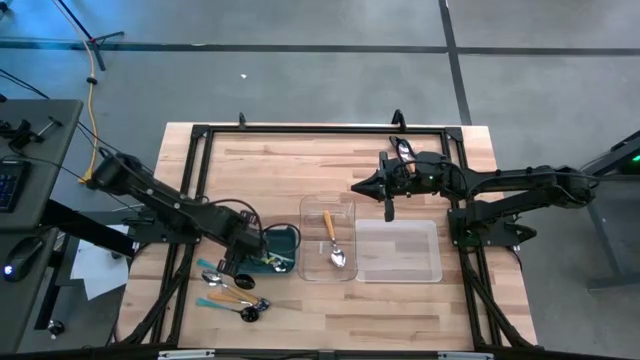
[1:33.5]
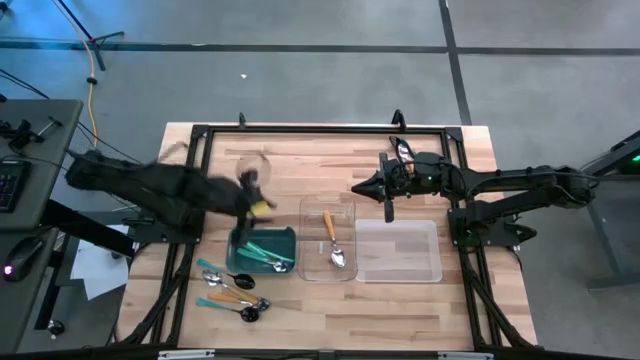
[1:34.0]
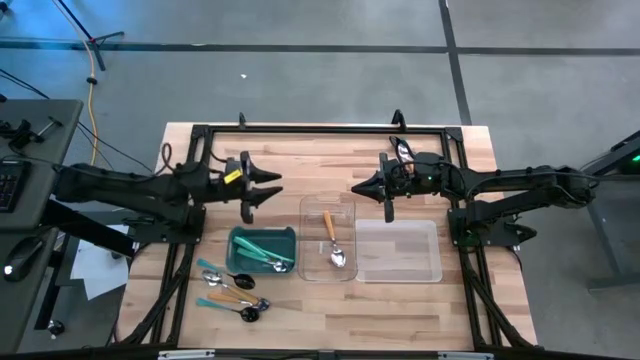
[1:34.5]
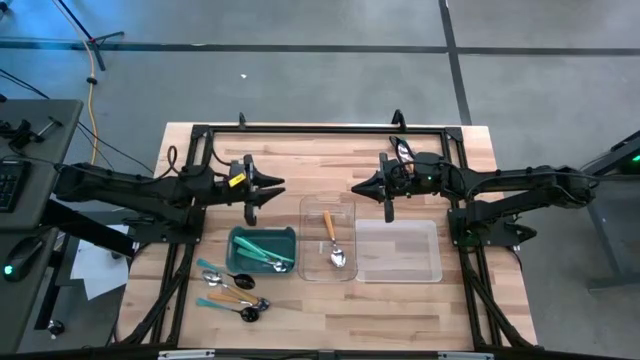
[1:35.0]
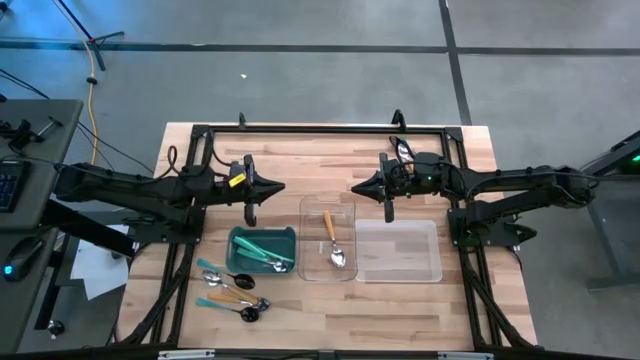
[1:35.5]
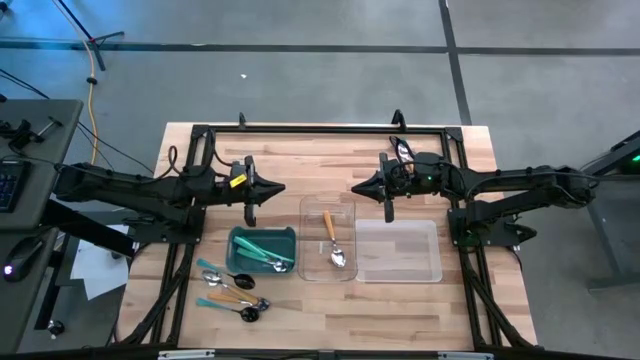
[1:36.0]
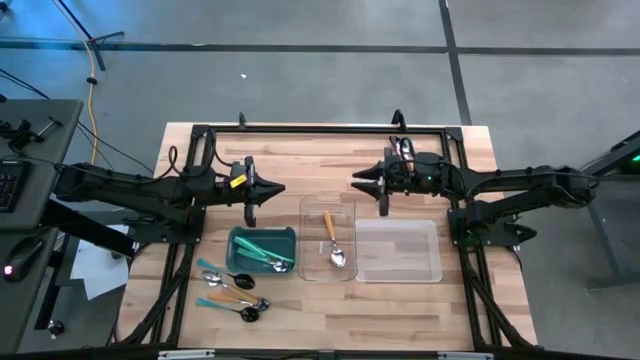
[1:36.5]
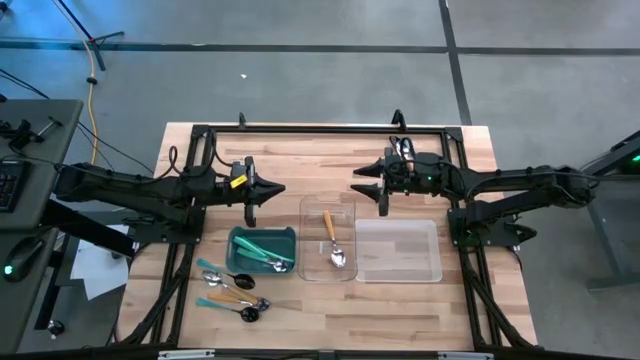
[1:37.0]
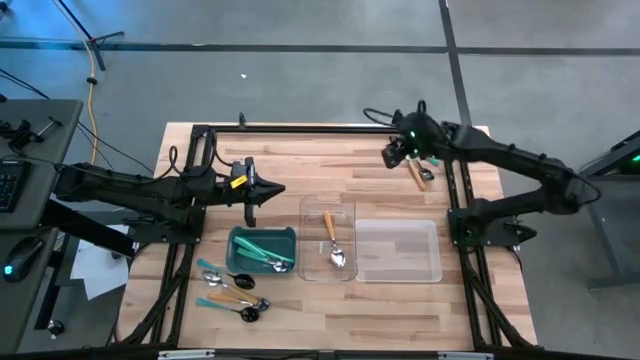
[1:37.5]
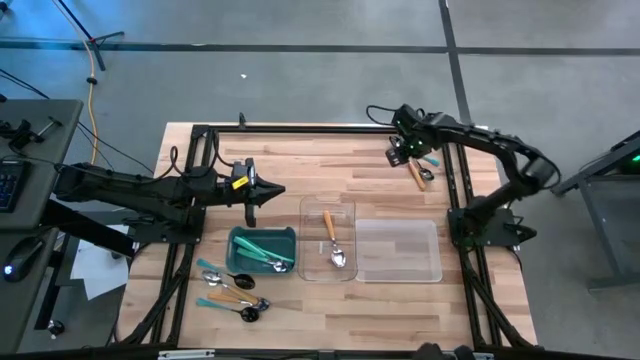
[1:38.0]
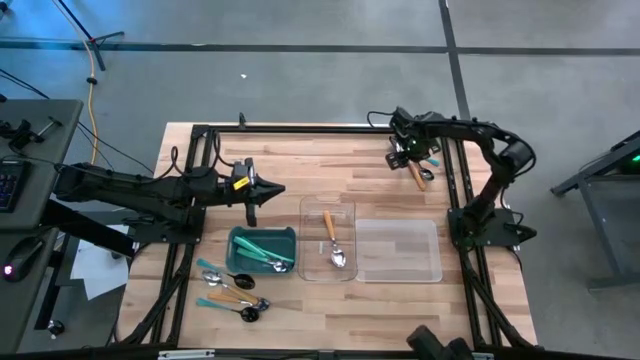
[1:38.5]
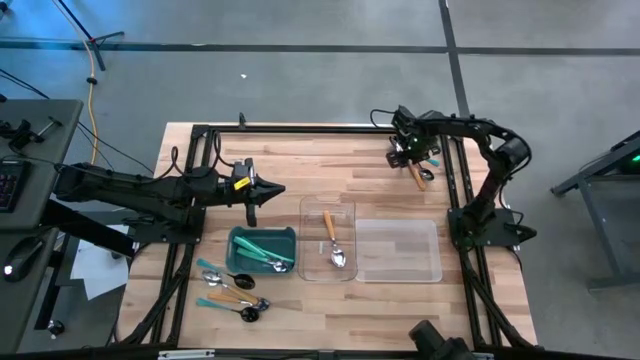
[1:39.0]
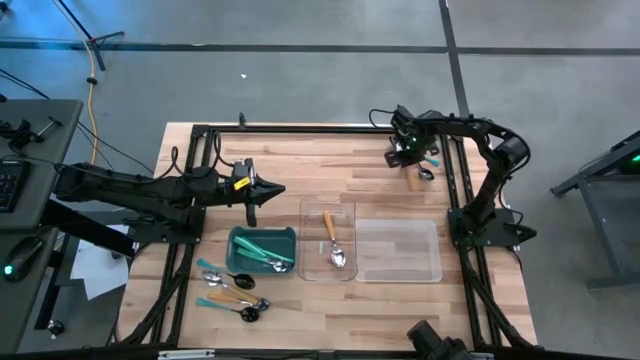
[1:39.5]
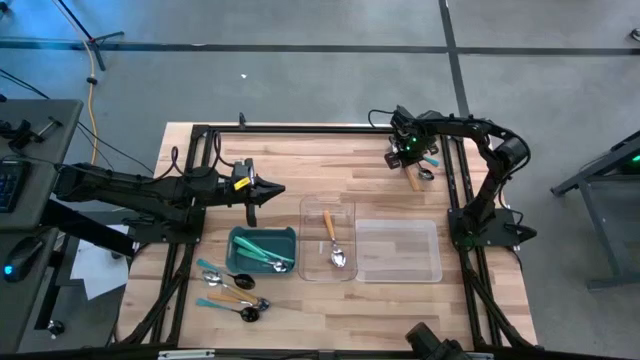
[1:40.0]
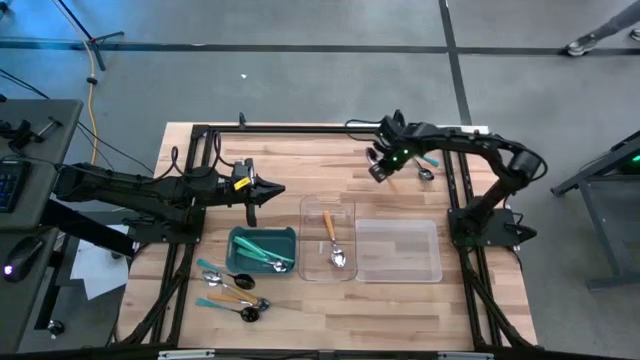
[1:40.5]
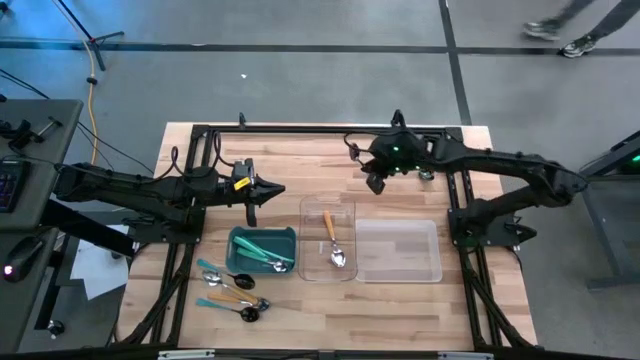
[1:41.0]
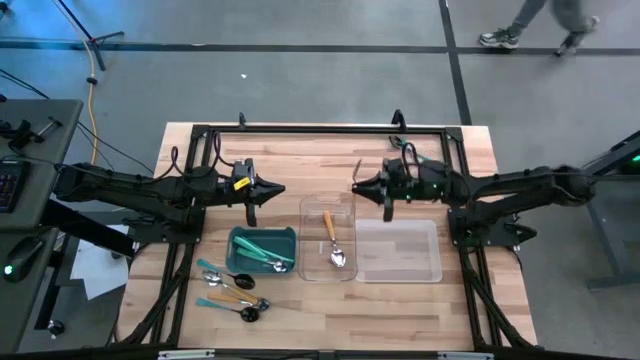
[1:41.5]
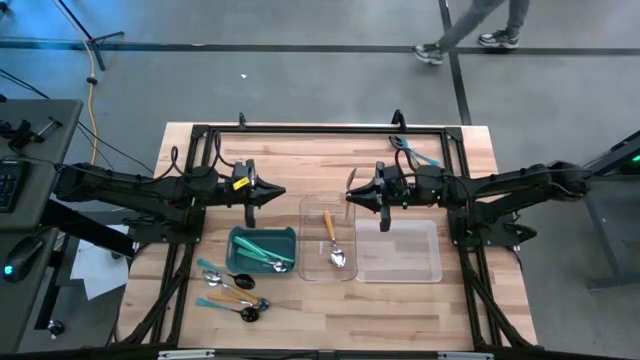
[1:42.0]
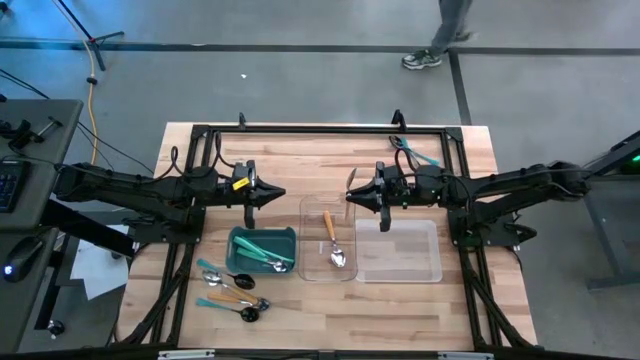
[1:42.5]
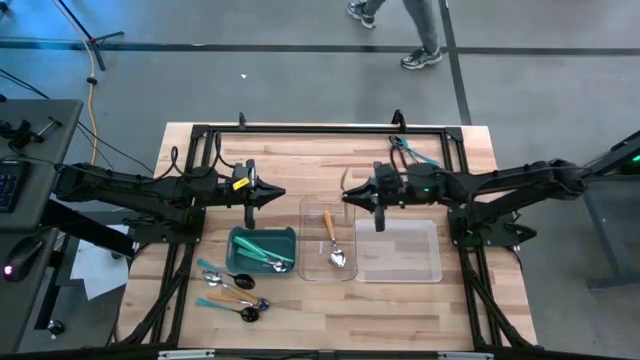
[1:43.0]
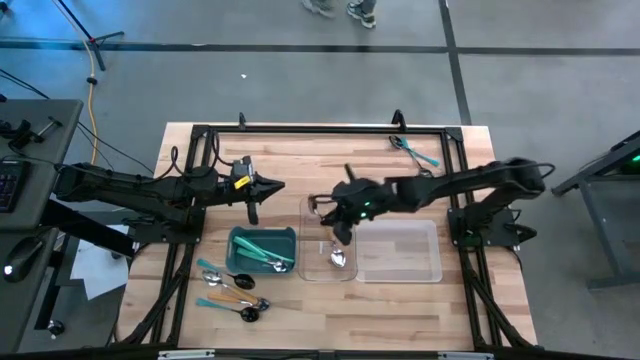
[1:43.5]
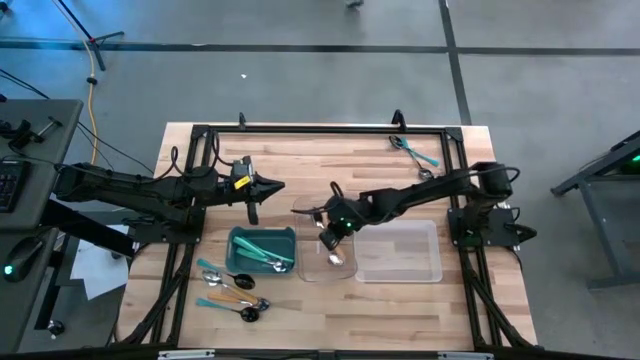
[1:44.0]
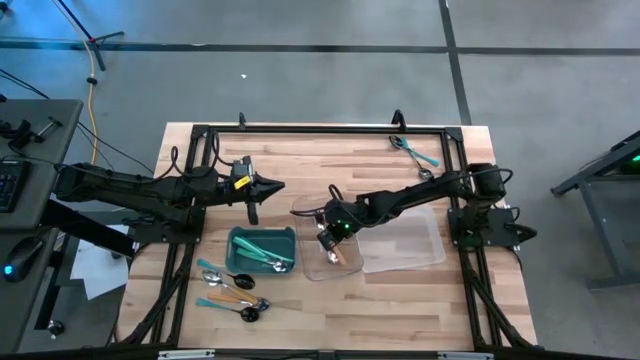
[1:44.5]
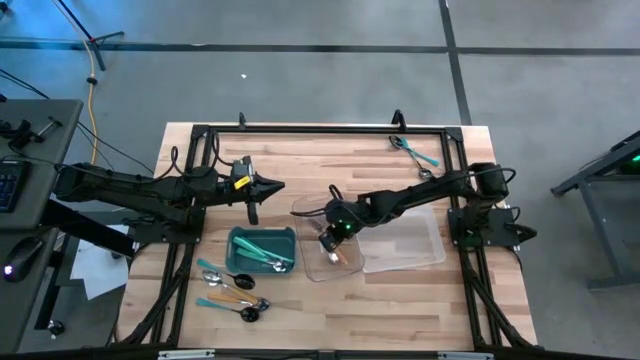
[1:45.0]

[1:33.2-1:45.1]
Task: Sort silverware by color (type)
Put the orange spoon into the transparent bin
